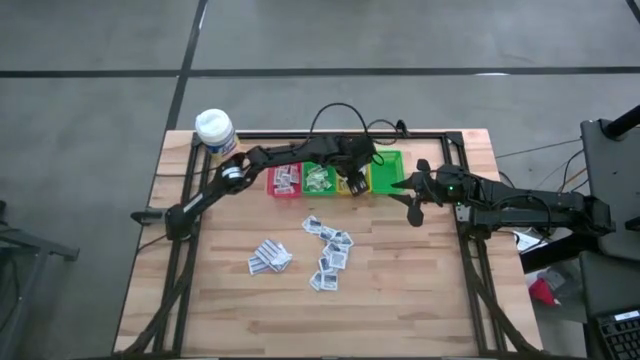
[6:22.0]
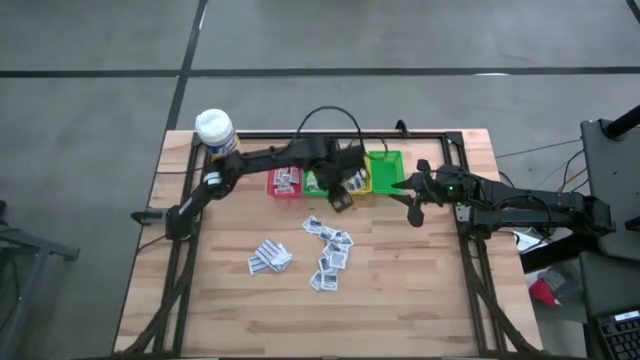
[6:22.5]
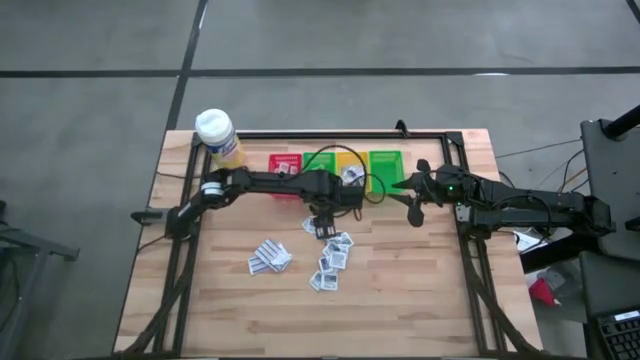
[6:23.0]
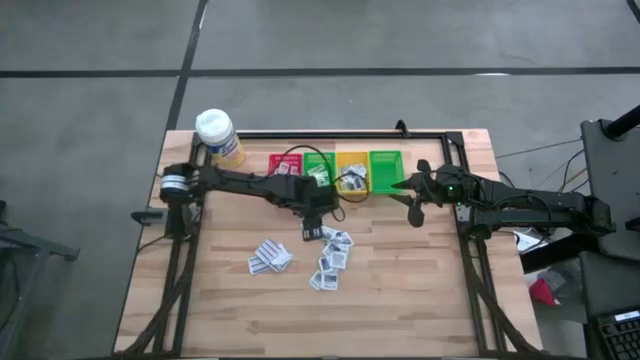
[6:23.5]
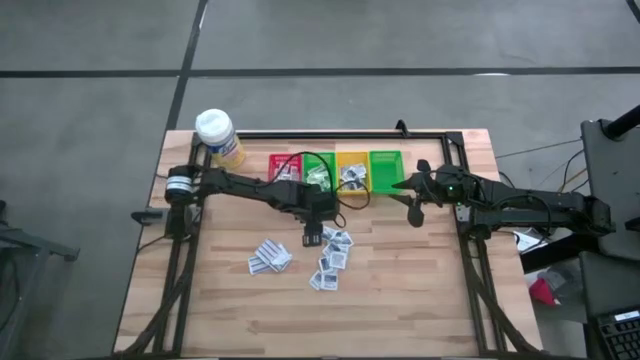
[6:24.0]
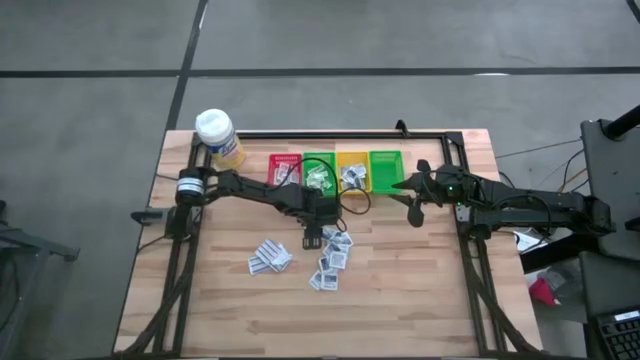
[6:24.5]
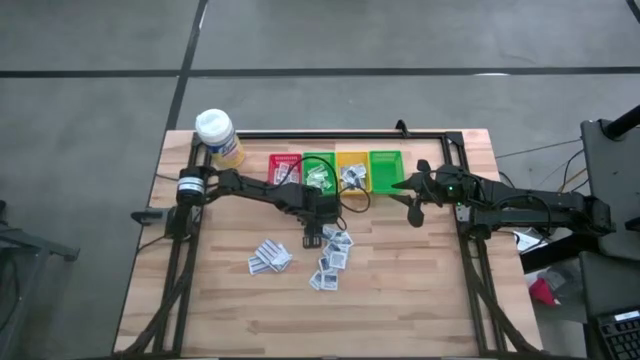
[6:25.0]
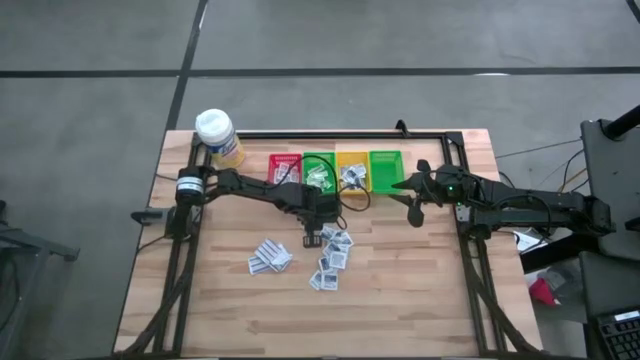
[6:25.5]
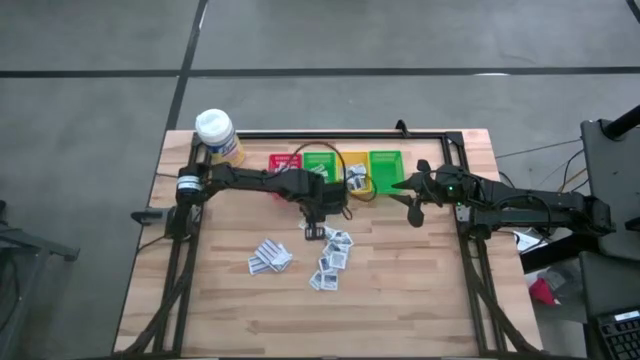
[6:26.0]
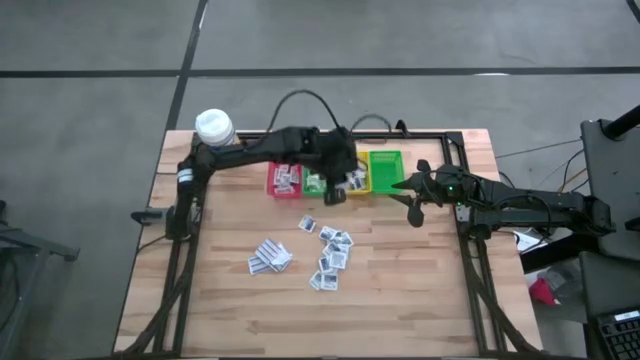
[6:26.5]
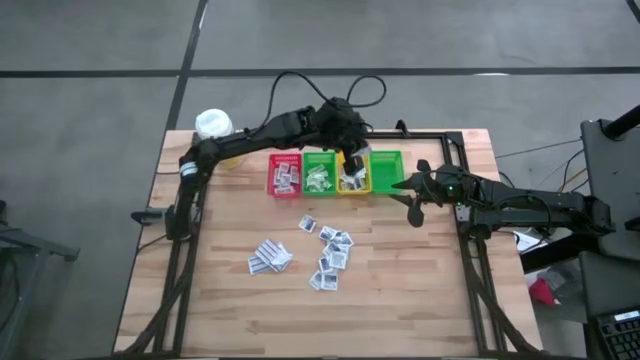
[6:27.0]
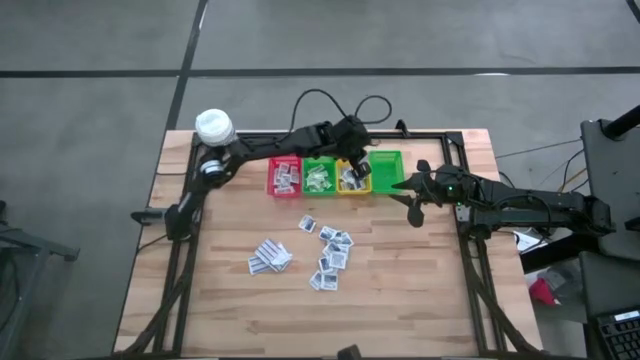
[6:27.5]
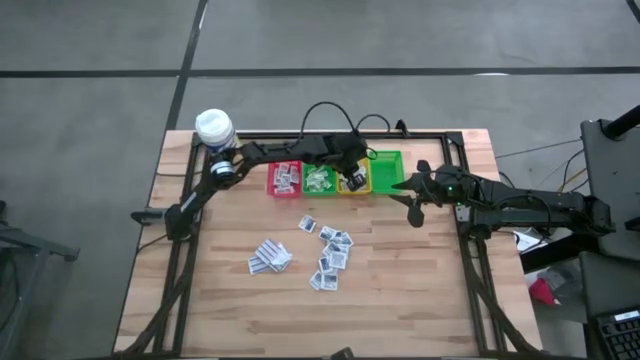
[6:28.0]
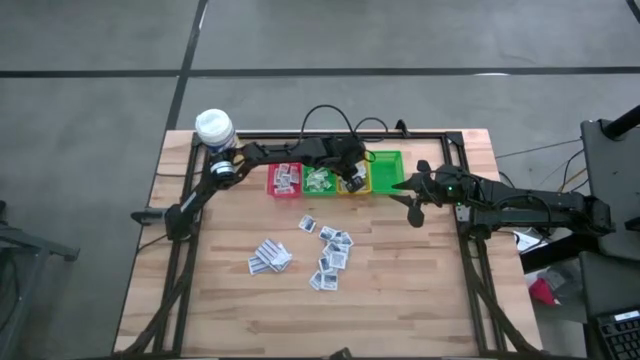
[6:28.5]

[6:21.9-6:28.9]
Task: Pick & Place First Aid Supplies
Put the alcohol pad into the yellow bin

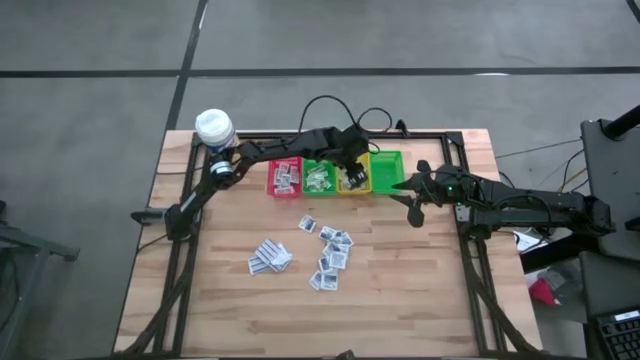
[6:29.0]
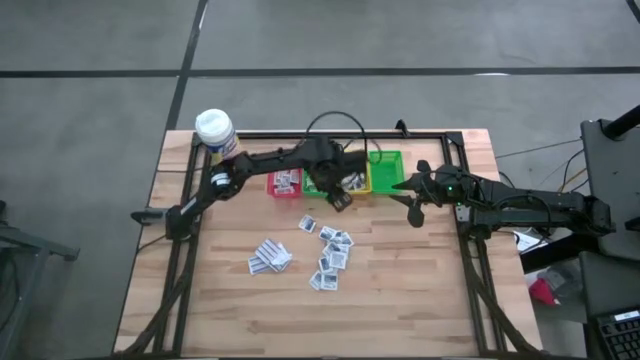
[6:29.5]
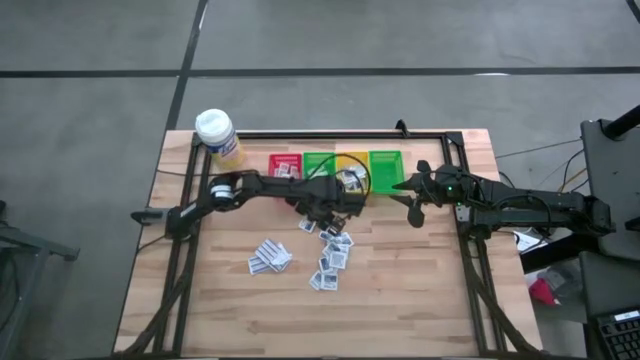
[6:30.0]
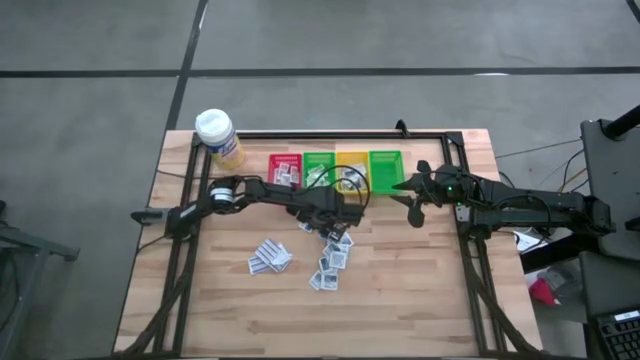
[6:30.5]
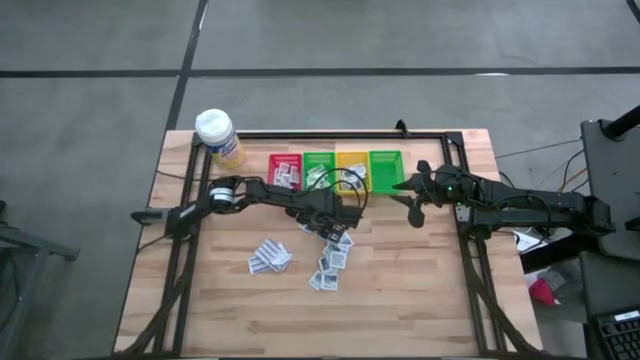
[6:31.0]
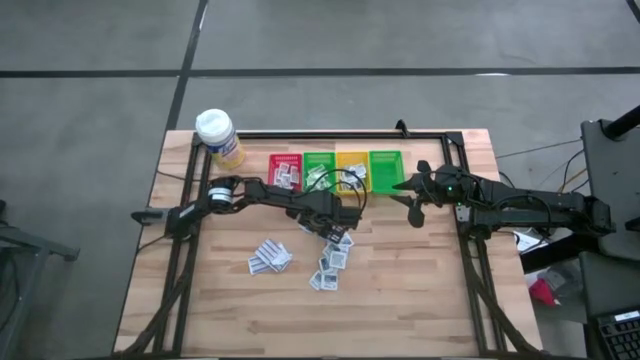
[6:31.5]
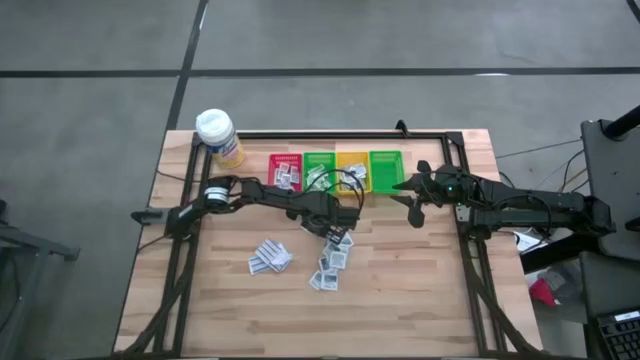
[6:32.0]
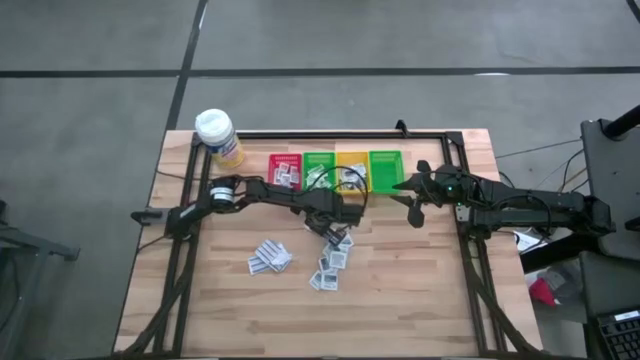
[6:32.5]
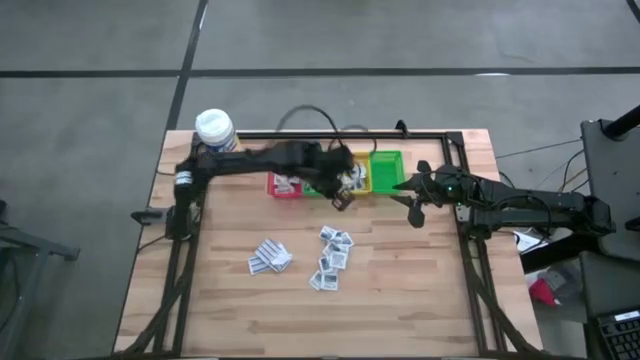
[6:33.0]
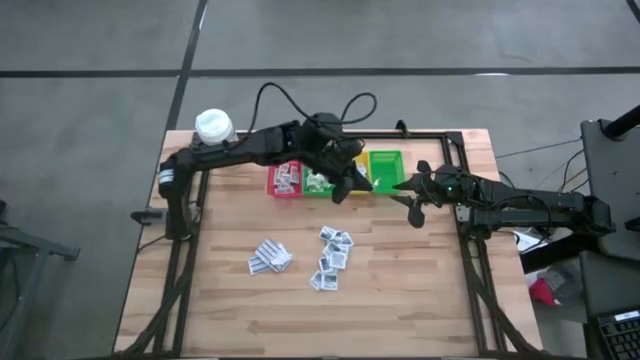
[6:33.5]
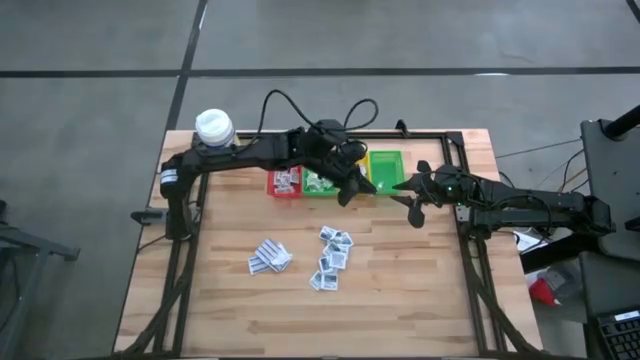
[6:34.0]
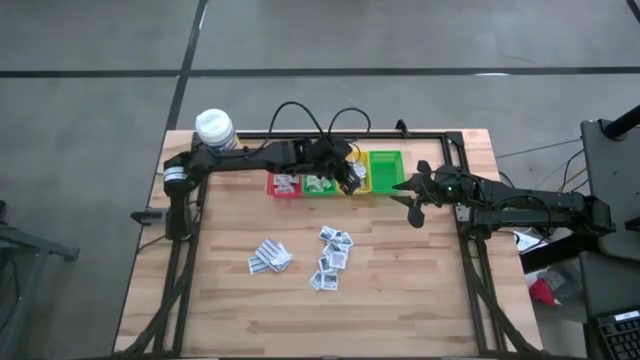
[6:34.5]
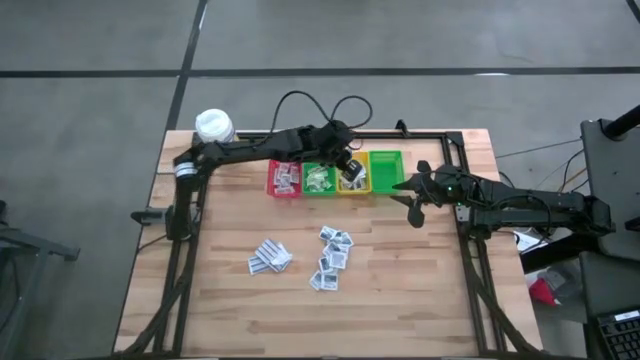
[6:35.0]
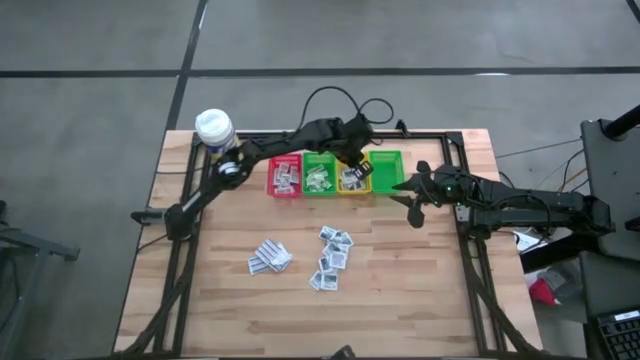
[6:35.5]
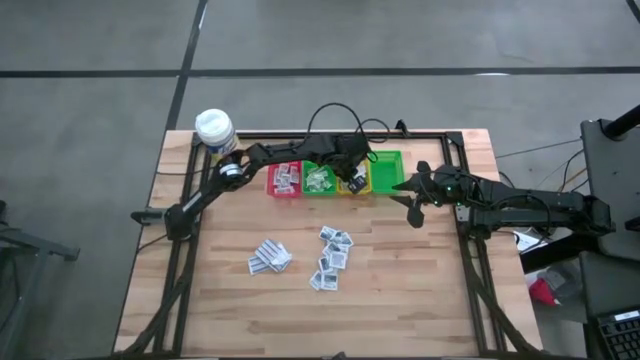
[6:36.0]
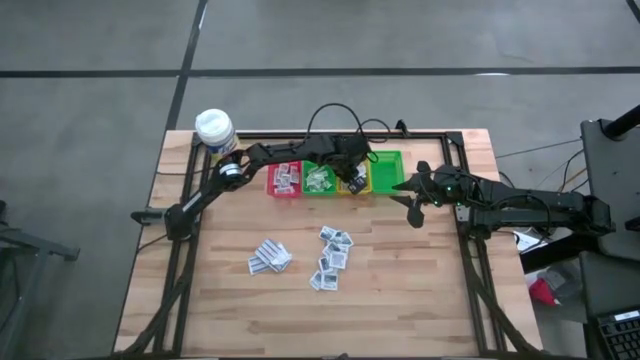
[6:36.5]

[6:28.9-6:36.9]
Put the alcohol pad into the yellow bin

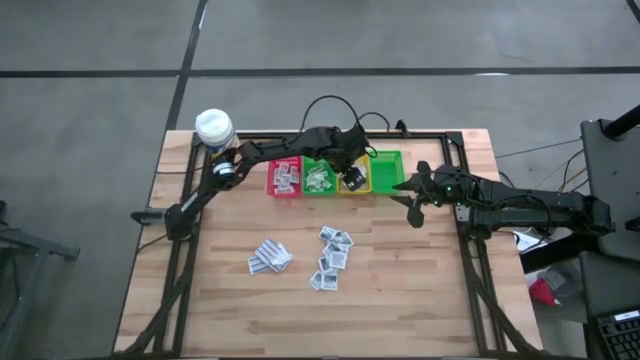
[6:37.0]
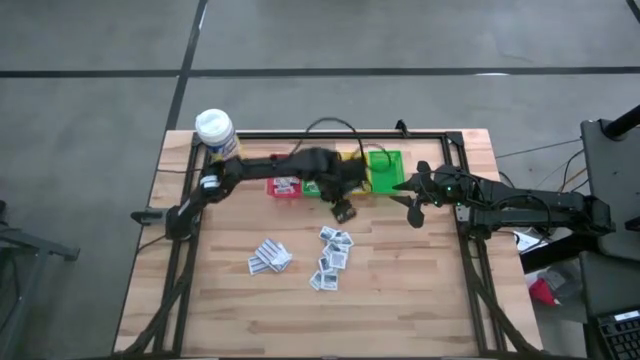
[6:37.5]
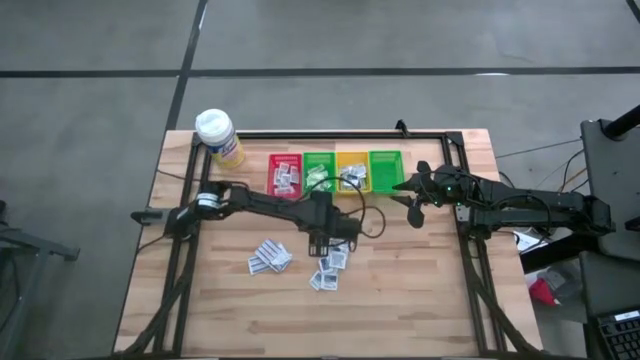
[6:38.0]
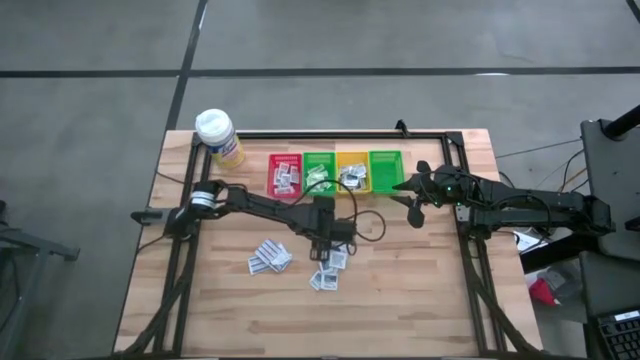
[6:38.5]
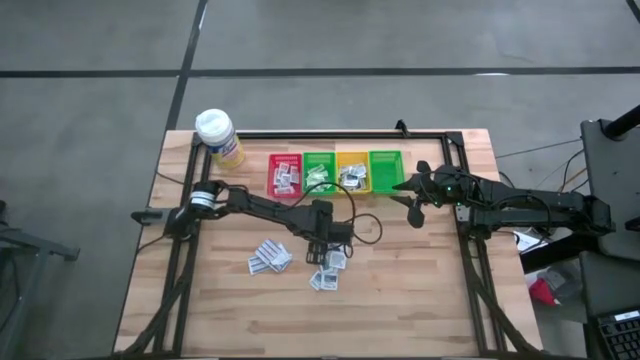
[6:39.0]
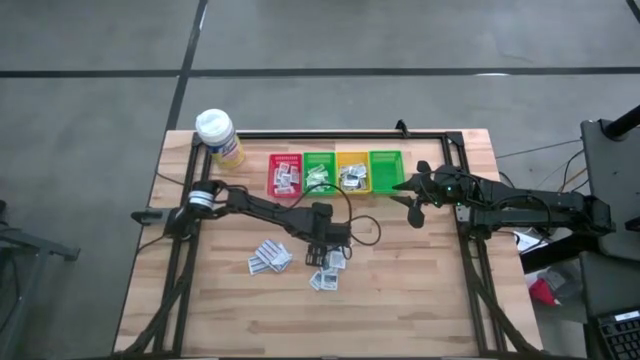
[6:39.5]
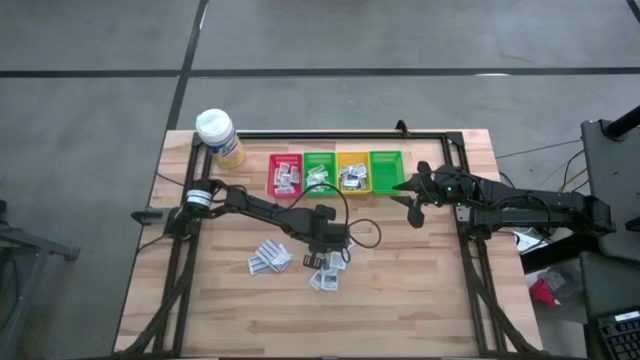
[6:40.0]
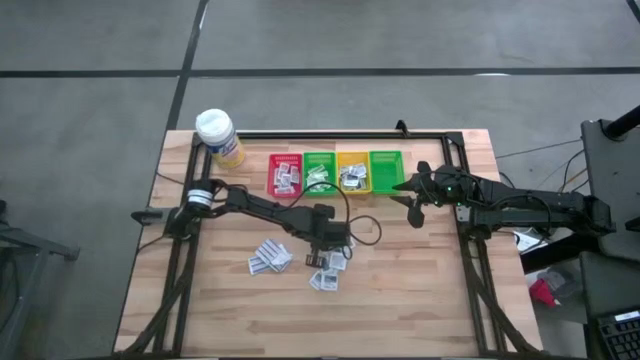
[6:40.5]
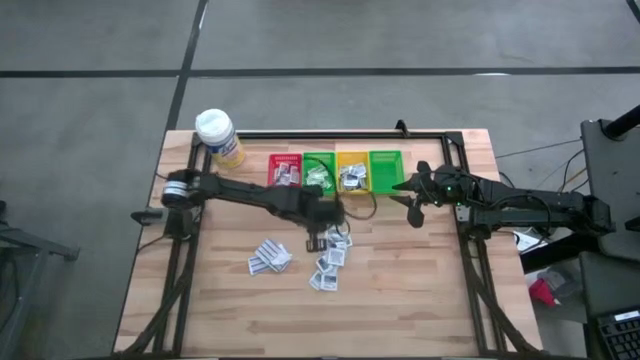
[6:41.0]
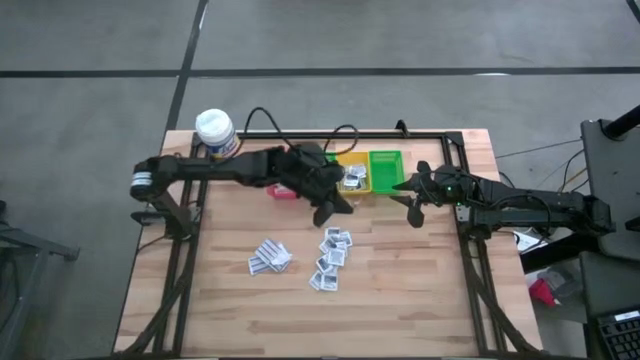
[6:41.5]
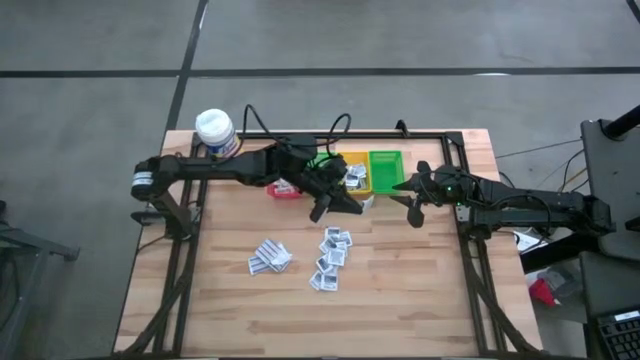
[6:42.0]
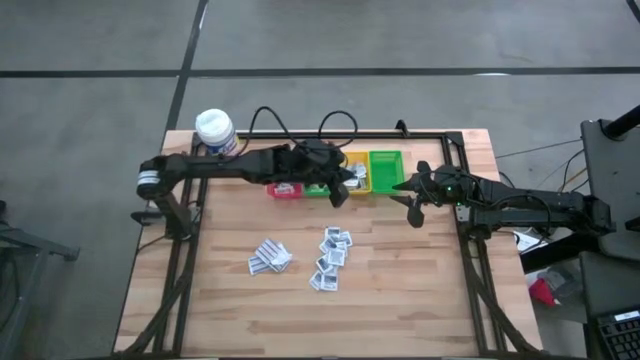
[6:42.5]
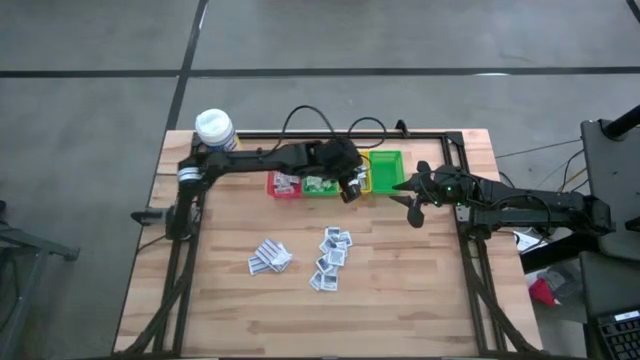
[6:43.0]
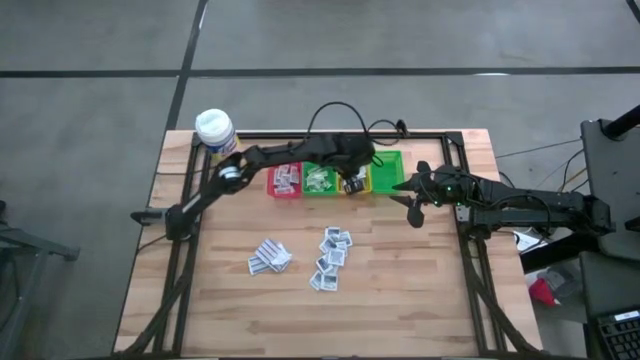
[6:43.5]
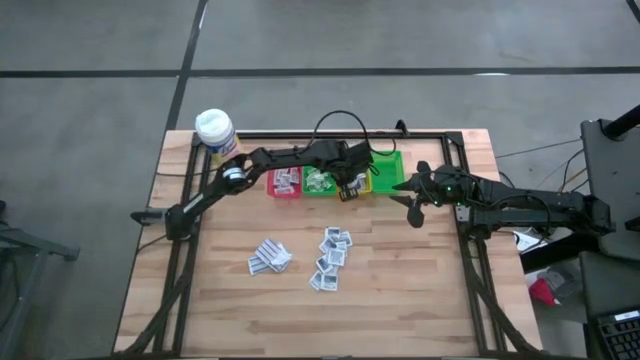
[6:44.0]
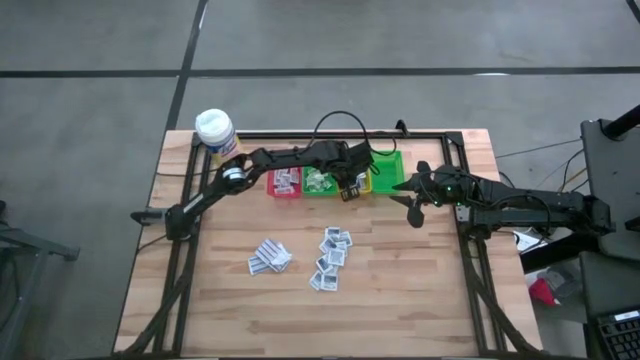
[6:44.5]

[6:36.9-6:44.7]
Put the alcohol pad into the yellow bin
